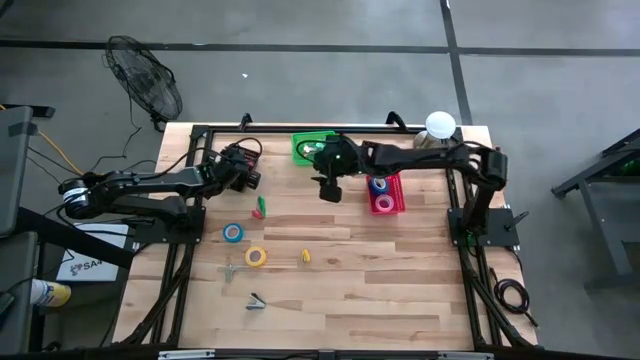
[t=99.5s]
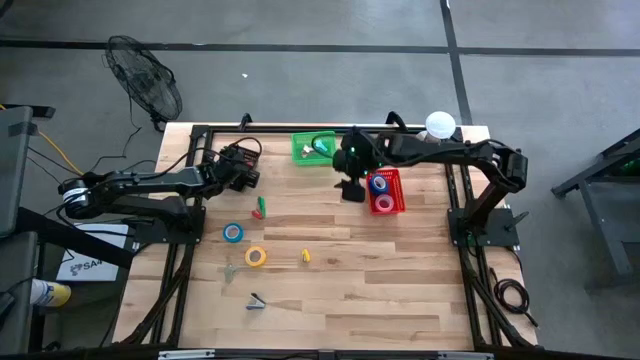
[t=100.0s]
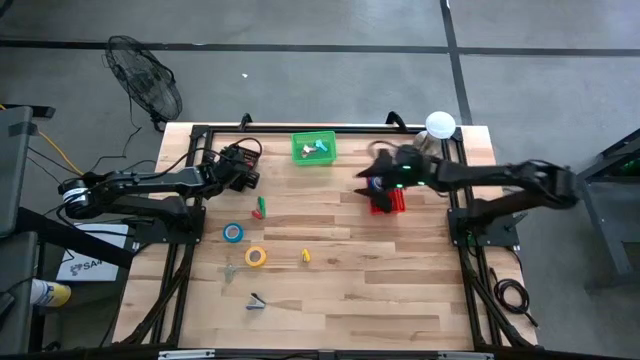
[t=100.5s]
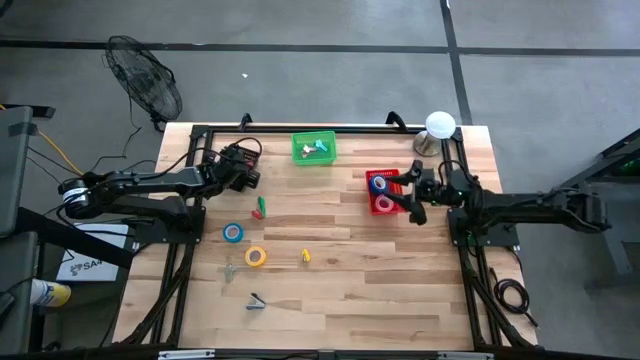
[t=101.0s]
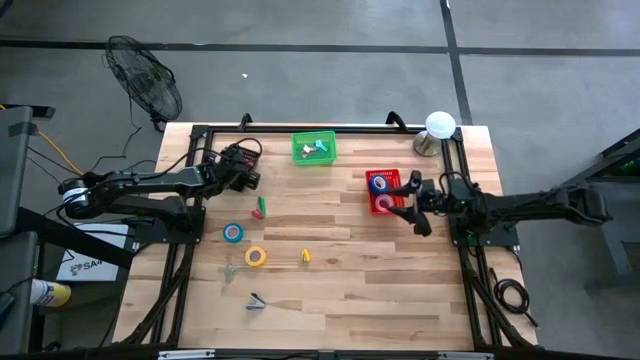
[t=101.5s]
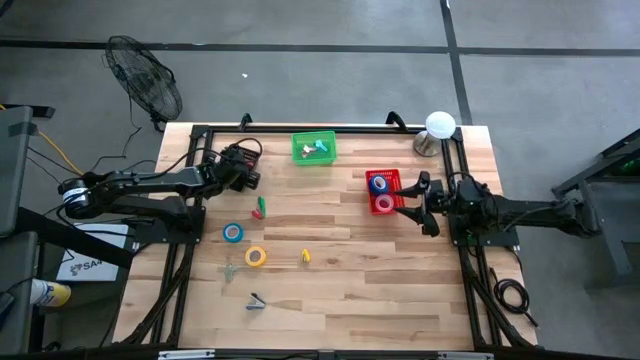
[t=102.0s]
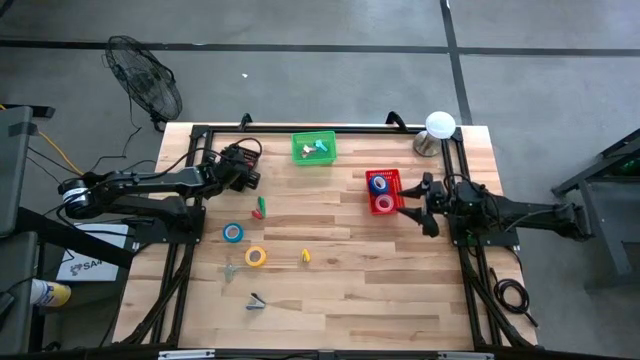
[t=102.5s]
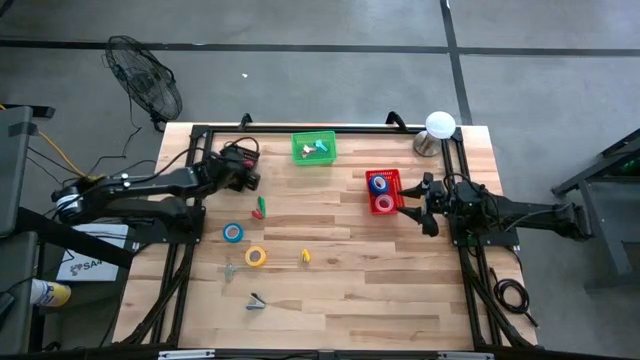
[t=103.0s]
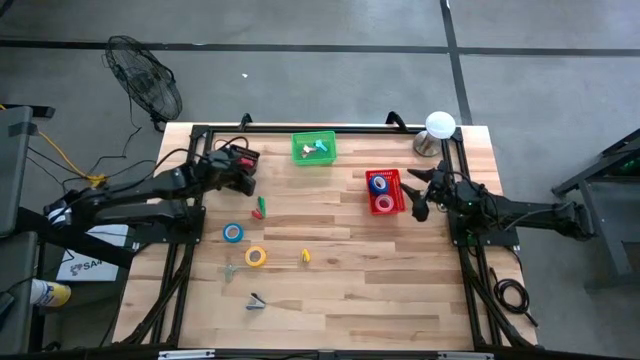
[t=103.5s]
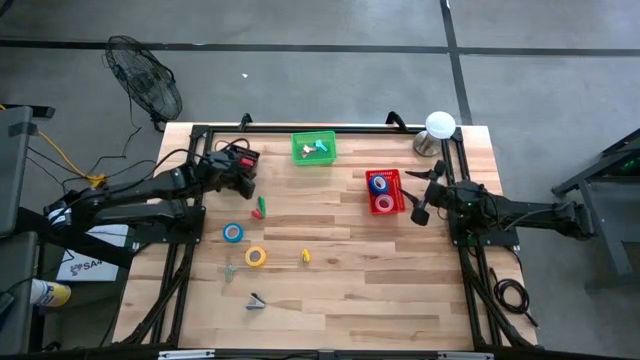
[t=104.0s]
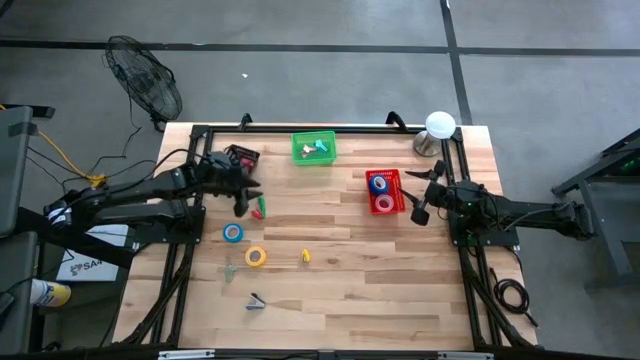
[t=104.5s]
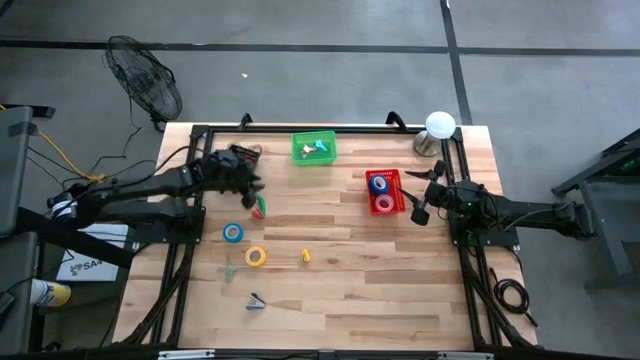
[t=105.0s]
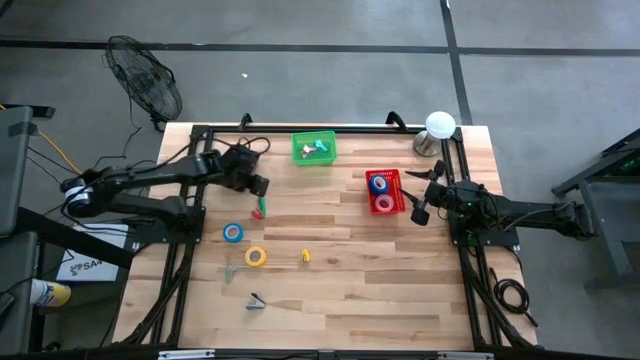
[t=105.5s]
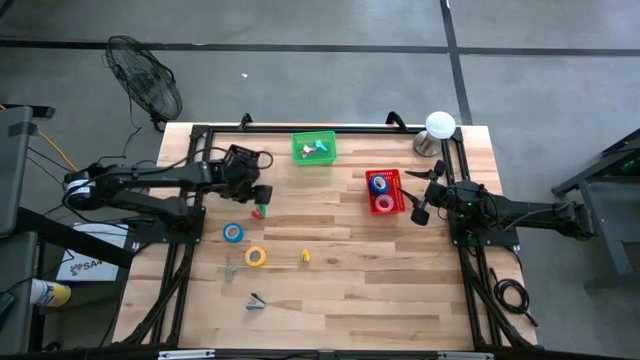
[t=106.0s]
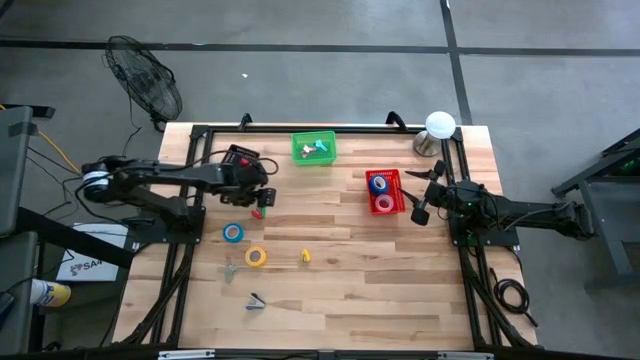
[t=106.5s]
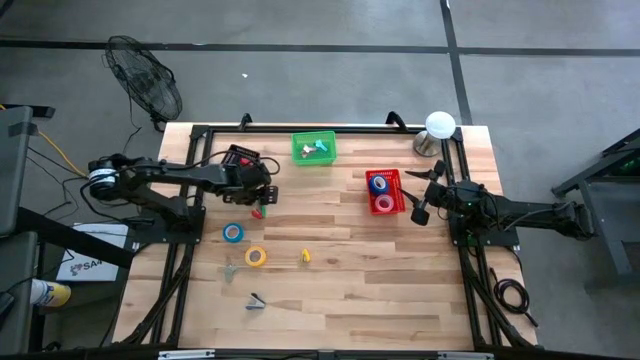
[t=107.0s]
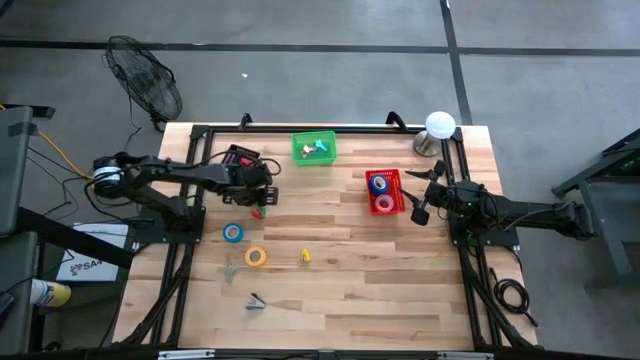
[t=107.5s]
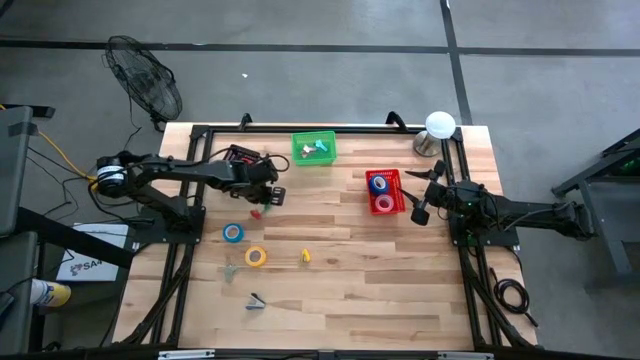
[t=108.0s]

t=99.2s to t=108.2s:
Task: Pick and place Stapler, Stapler remover, tape
Put the green stapler into the black bin

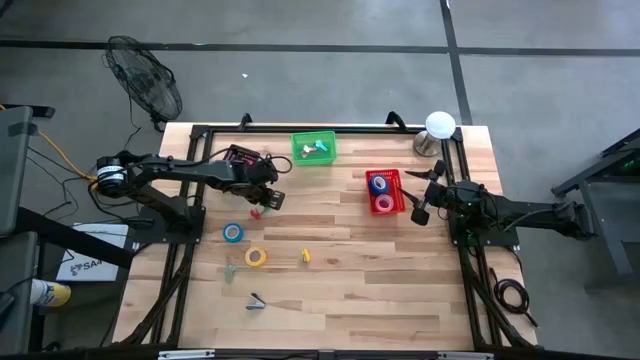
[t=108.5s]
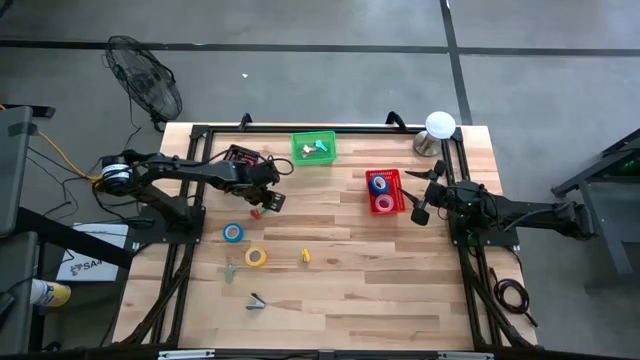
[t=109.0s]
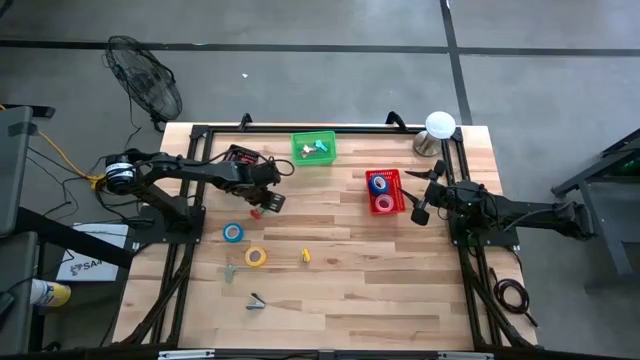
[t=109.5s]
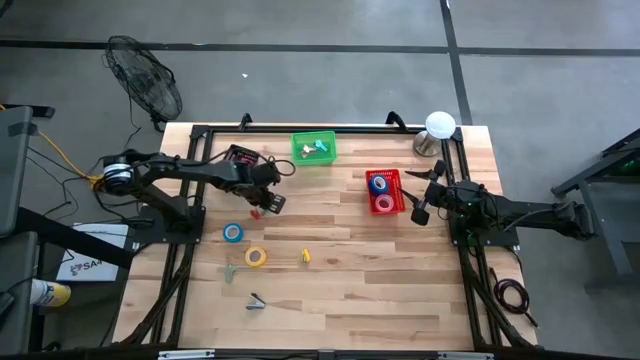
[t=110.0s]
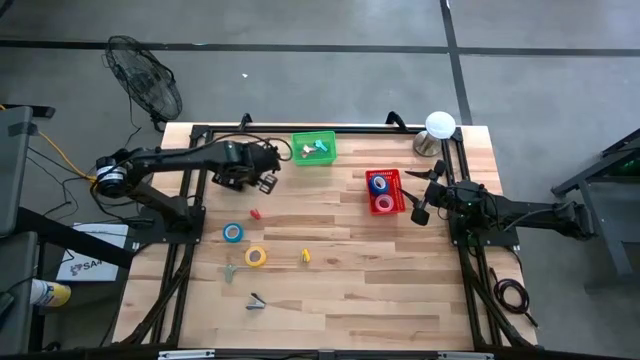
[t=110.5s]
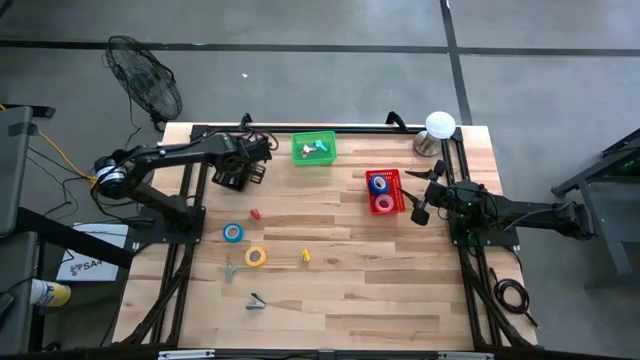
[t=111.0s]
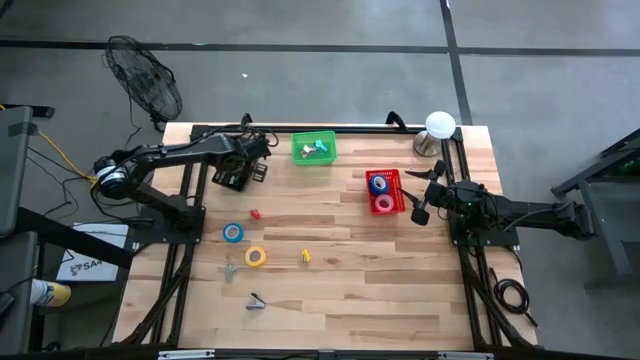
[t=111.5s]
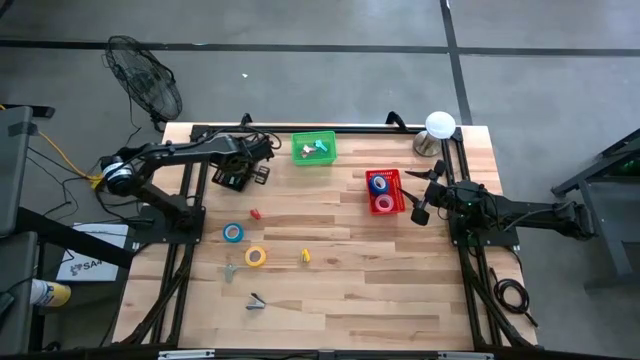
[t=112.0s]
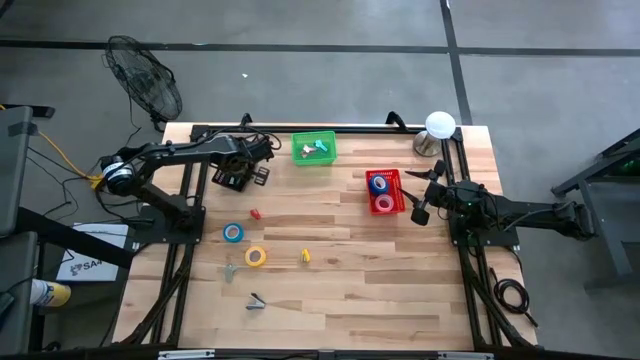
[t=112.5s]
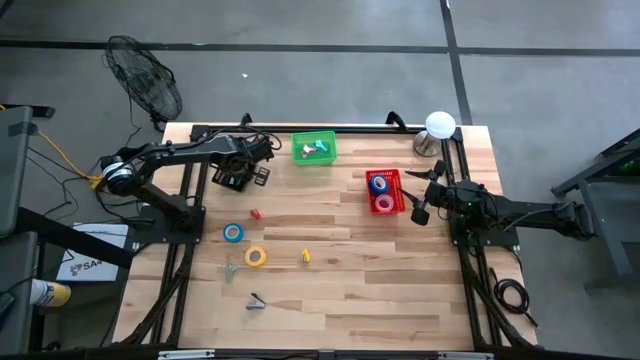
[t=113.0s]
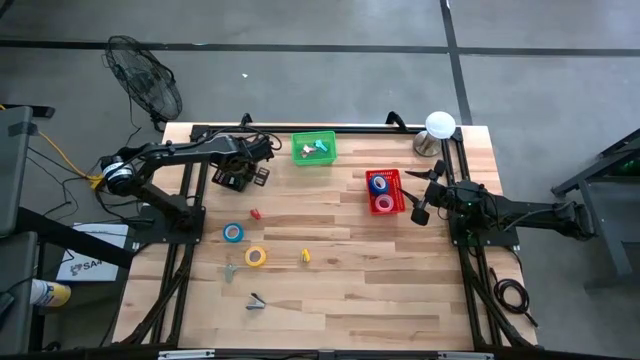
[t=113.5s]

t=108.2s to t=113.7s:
Put the green stapler into the black bin

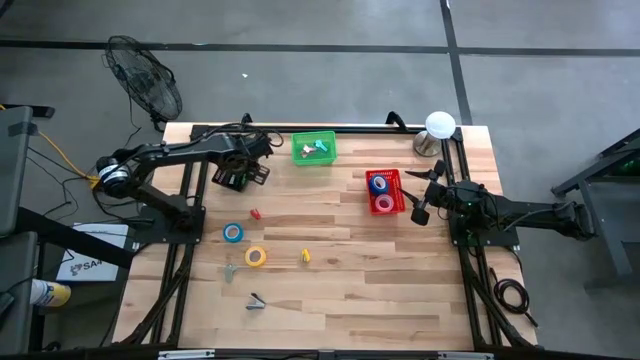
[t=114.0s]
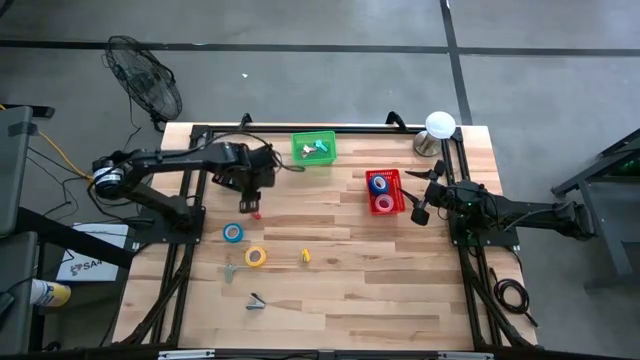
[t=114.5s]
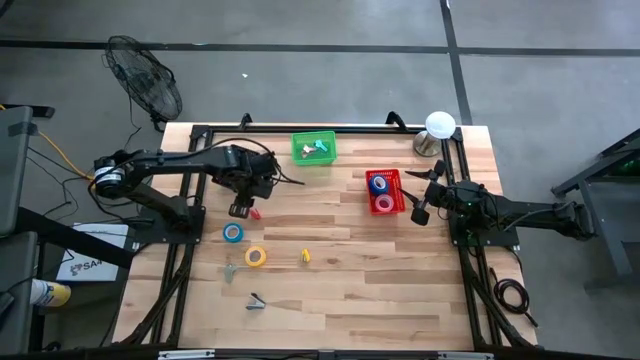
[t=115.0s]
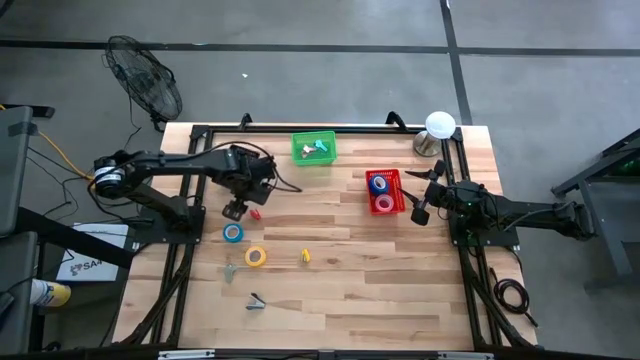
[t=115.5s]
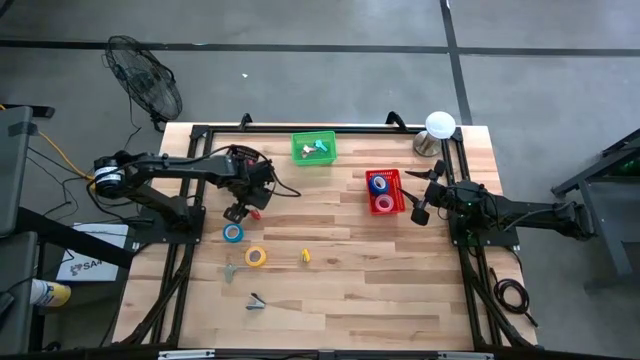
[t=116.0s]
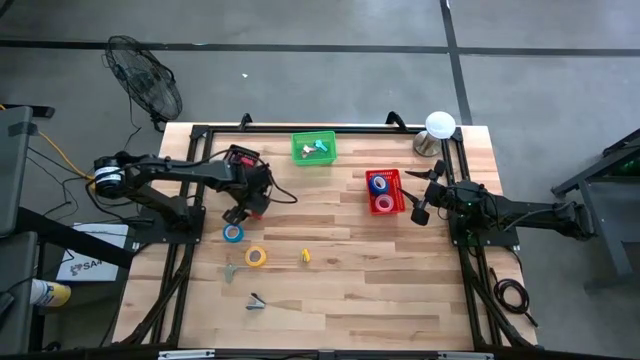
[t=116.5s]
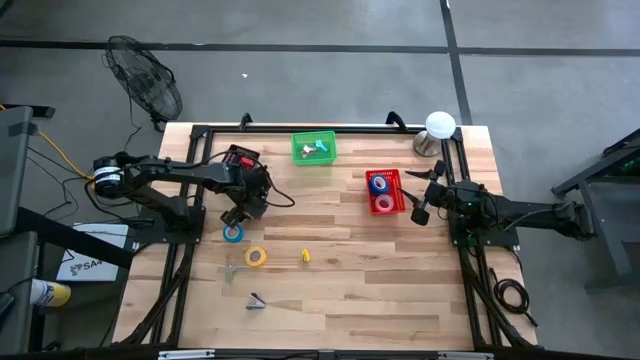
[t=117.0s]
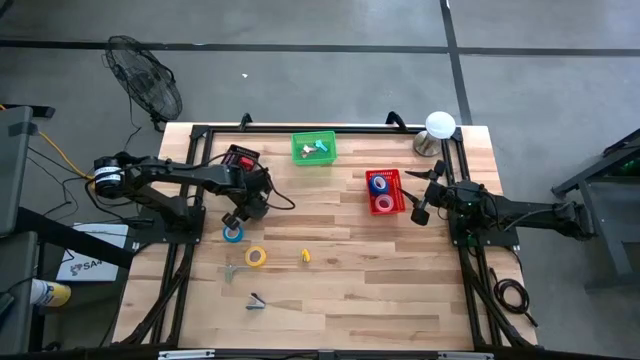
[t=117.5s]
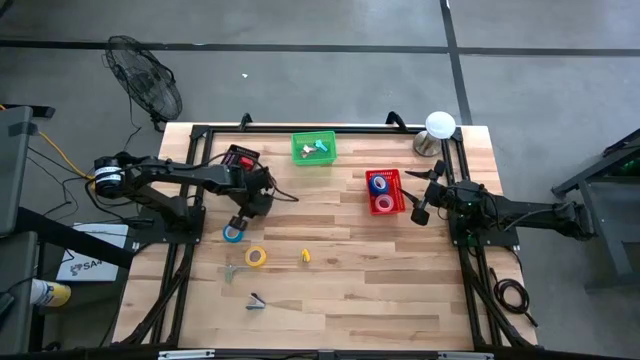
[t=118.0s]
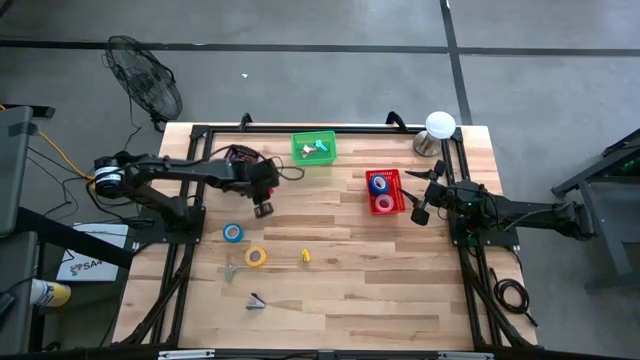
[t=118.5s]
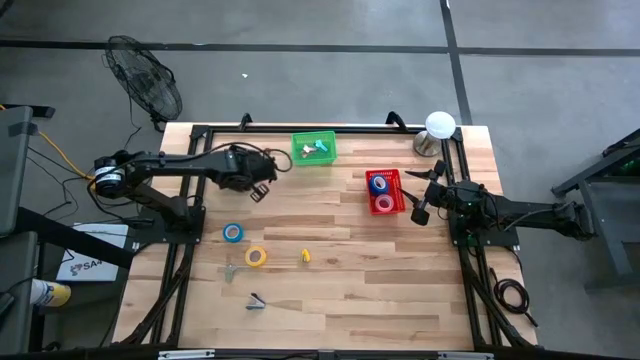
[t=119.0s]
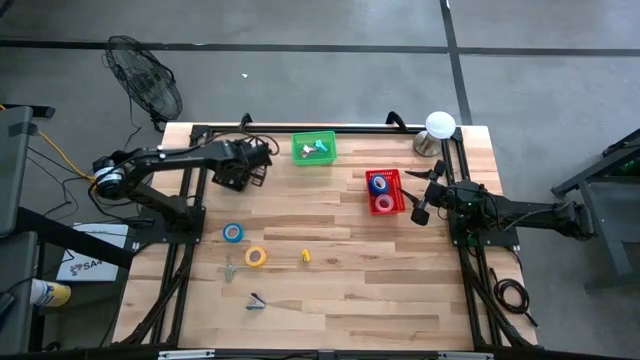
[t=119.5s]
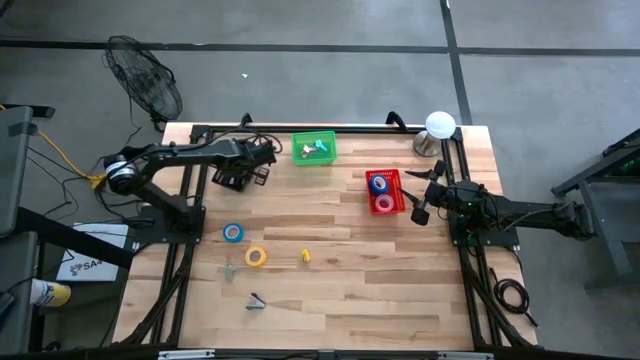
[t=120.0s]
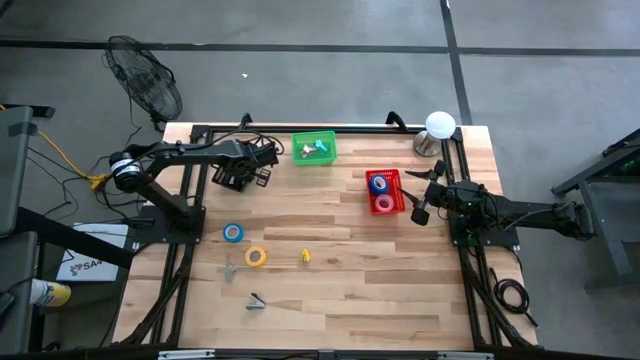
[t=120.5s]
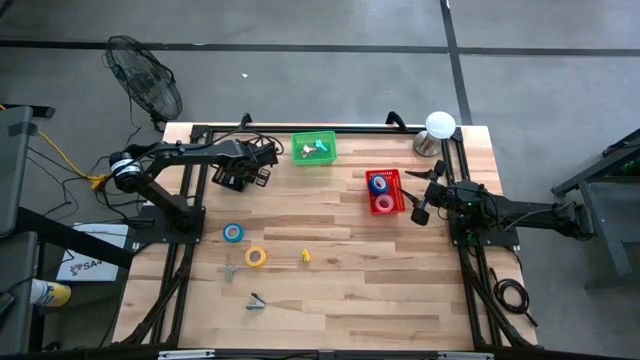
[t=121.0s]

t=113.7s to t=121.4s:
Put the red stapler into the black bin
